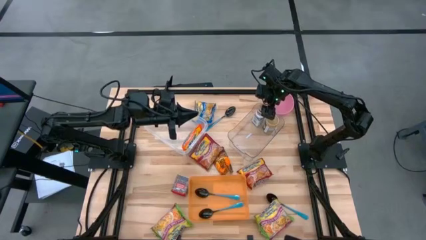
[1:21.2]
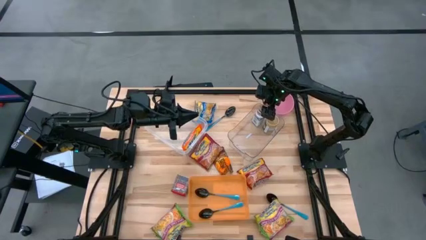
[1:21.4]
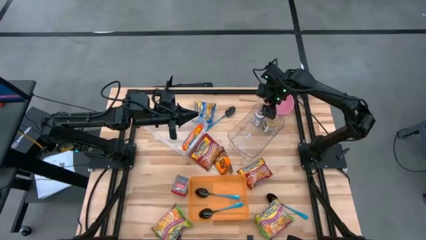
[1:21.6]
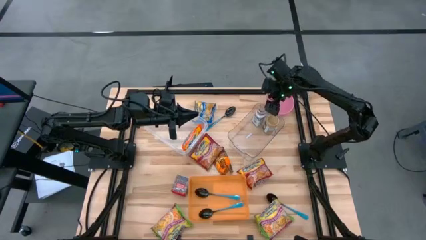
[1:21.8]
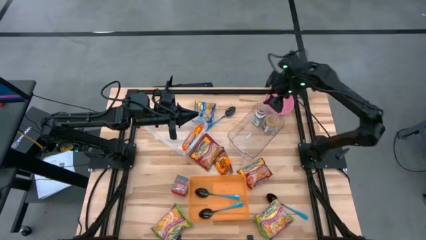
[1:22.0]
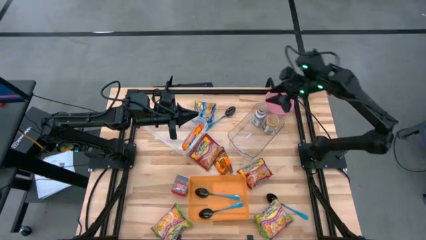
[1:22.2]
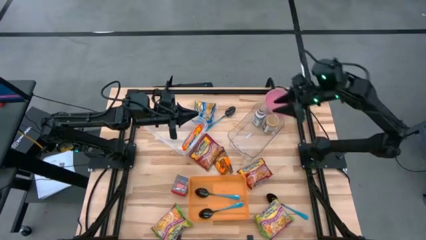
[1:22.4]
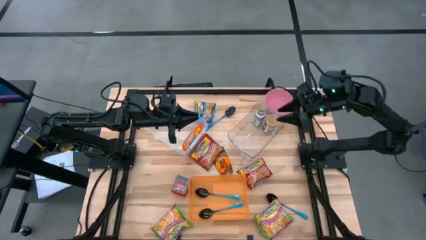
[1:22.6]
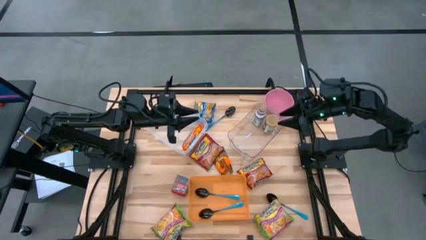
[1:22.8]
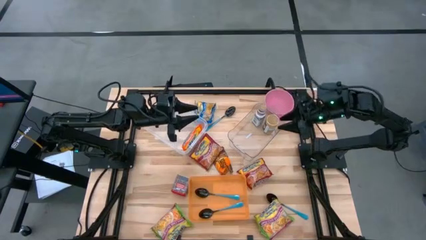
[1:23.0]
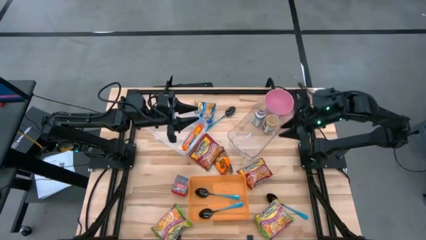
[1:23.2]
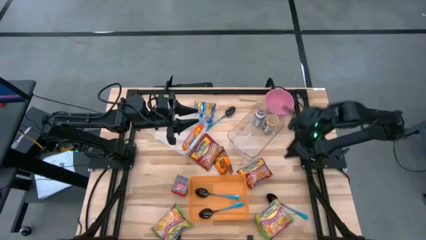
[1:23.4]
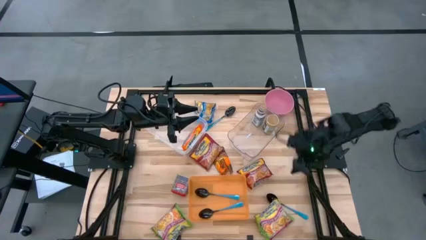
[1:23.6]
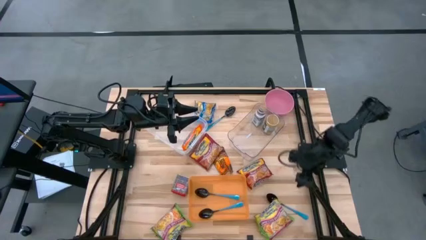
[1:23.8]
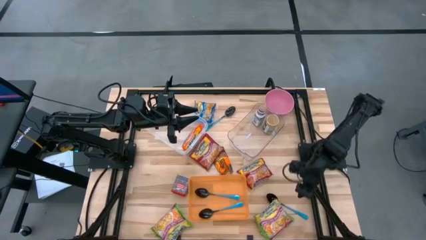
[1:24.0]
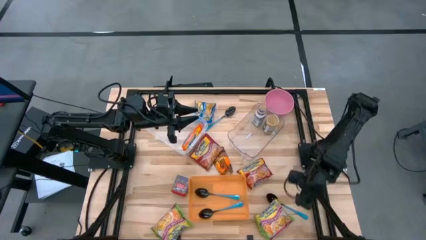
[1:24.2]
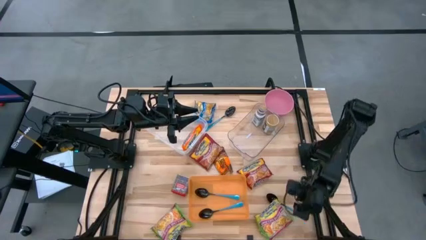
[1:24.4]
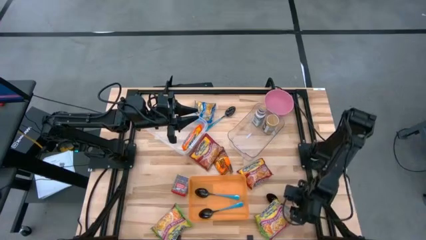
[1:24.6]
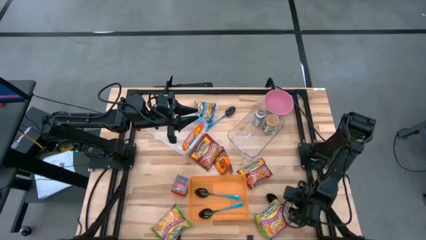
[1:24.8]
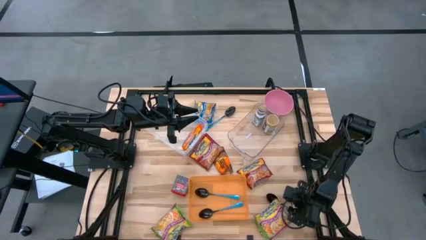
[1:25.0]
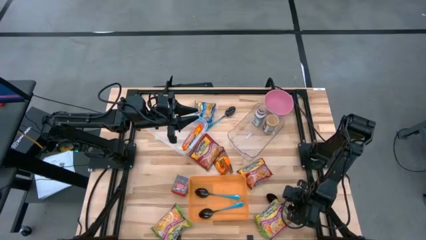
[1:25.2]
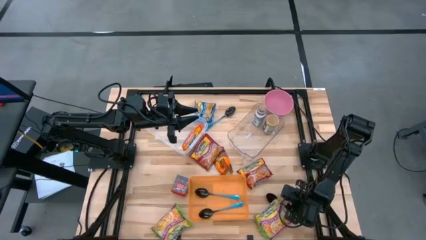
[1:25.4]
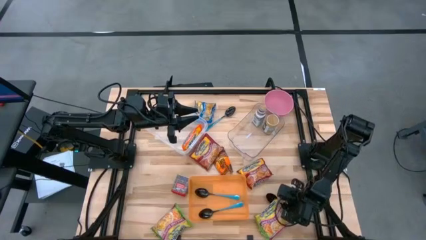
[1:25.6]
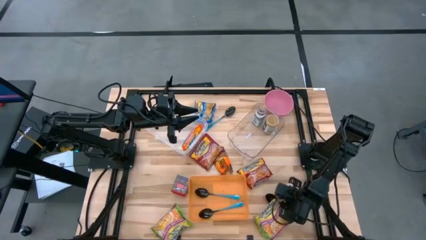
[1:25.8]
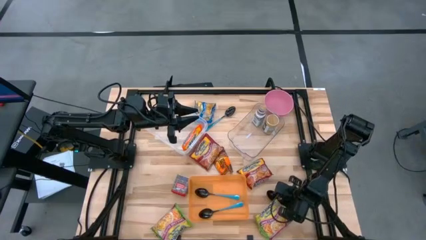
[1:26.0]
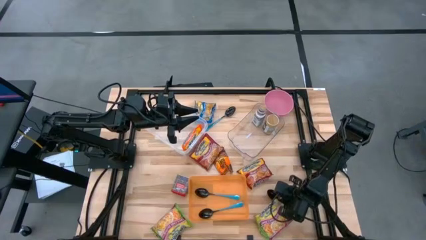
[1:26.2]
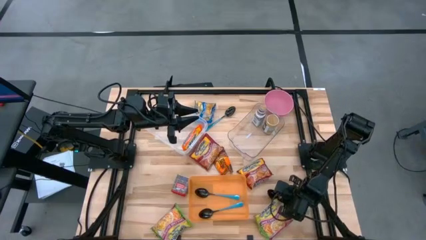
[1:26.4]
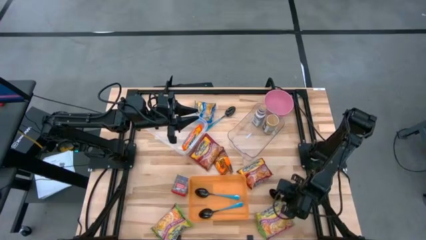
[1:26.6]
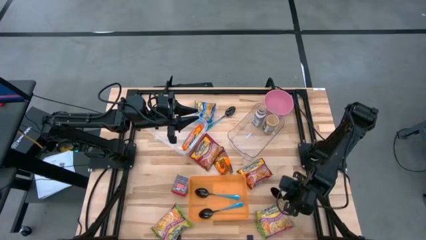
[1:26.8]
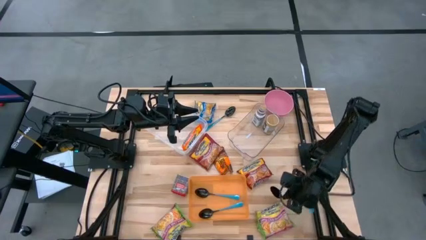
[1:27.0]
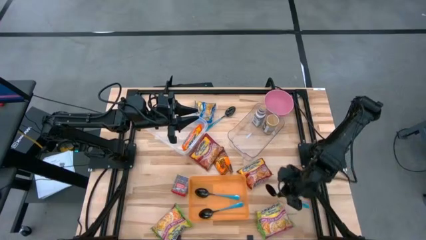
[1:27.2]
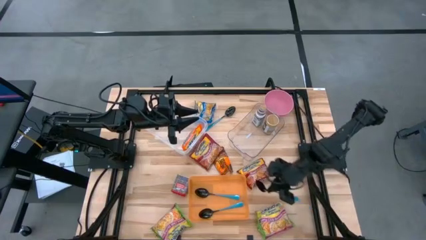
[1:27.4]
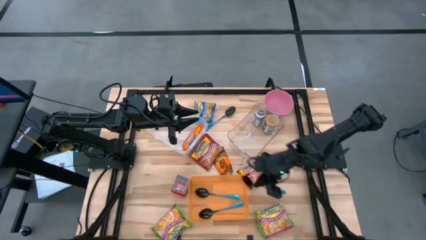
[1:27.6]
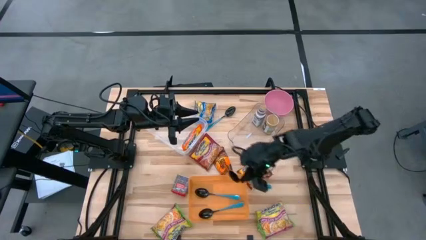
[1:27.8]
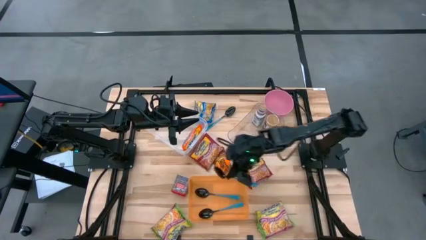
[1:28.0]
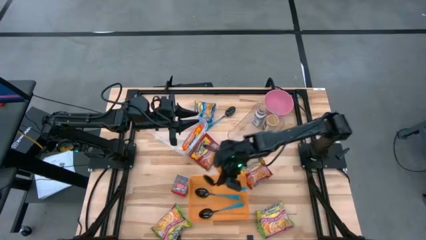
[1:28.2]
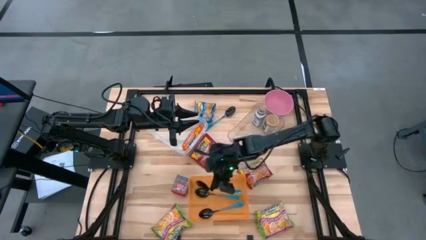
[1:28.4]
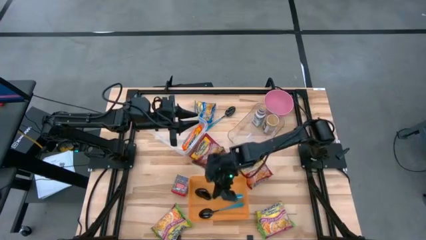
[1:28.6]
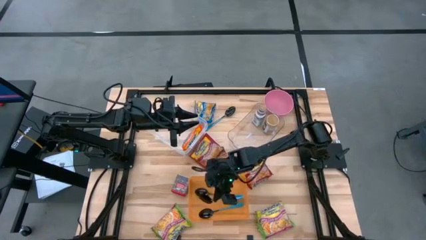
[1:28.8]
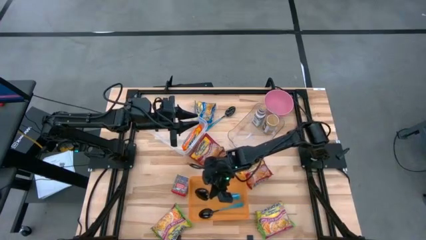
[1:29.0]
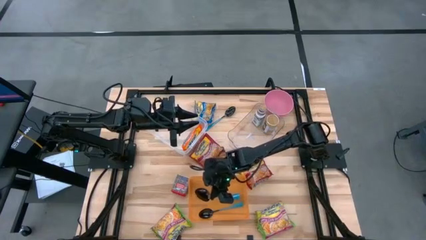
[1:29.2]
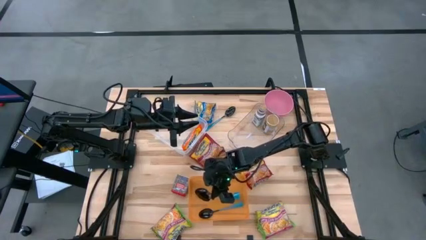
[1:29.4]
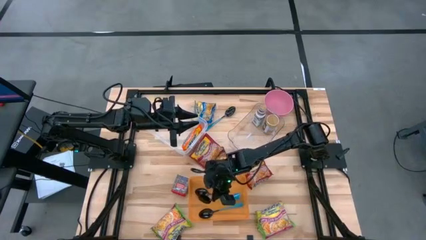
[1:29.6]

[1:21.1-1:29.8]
Task: Pick & Place Food Item
Put the black spoon into the orange bin

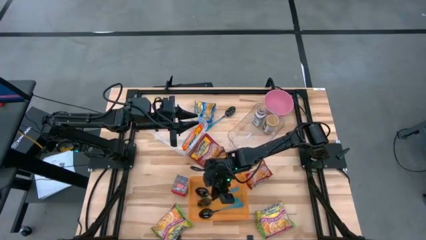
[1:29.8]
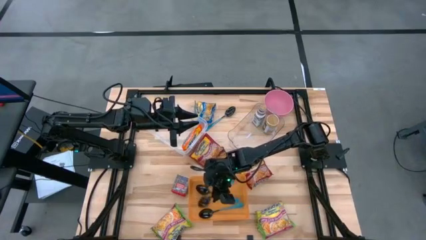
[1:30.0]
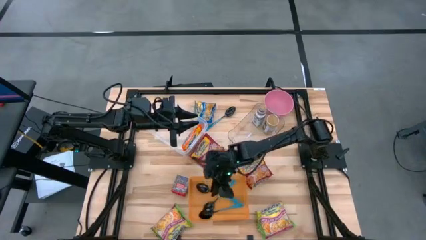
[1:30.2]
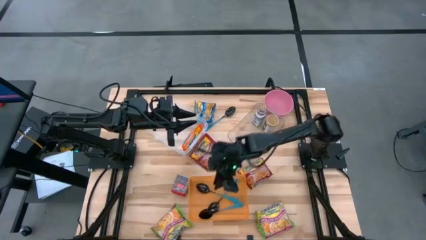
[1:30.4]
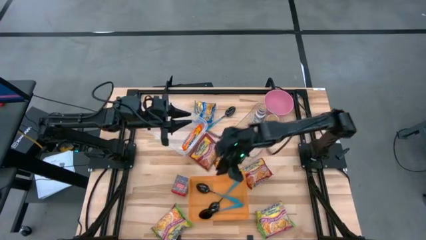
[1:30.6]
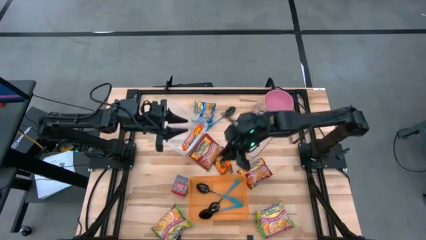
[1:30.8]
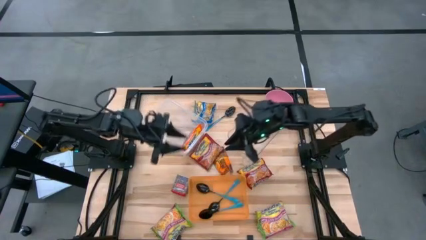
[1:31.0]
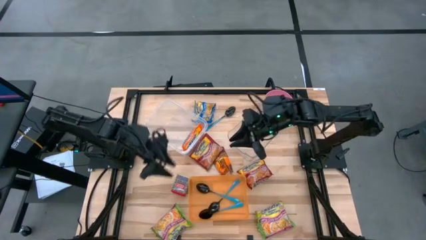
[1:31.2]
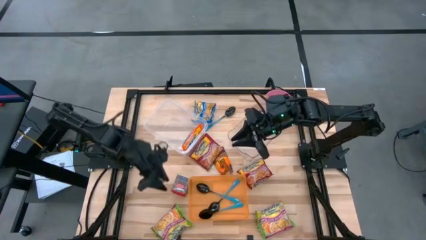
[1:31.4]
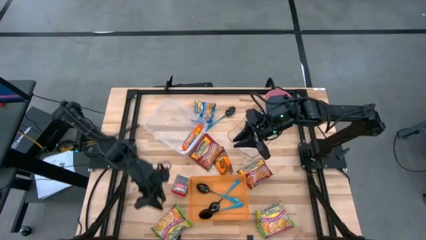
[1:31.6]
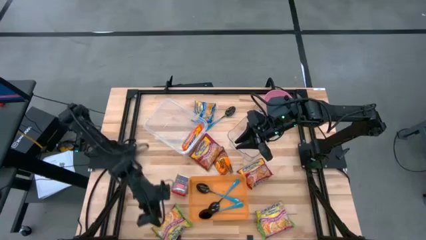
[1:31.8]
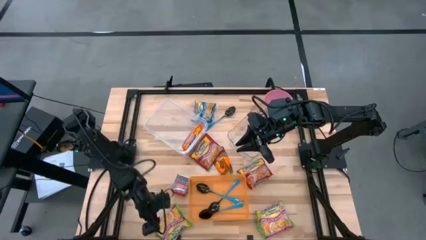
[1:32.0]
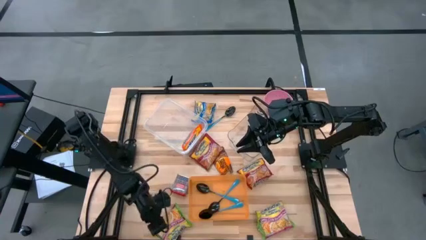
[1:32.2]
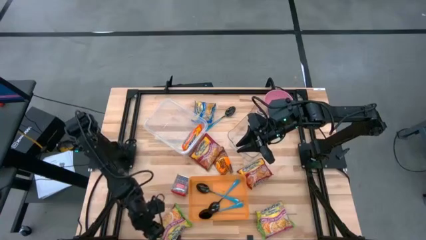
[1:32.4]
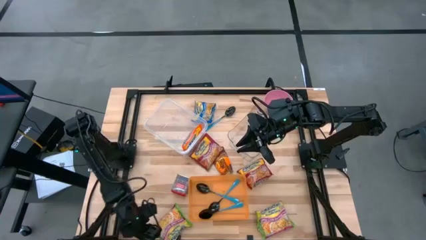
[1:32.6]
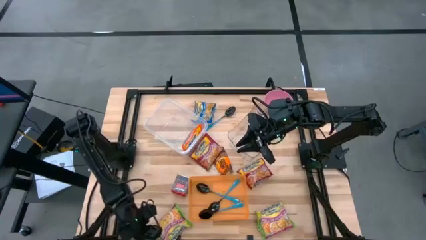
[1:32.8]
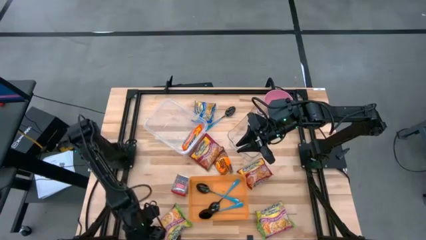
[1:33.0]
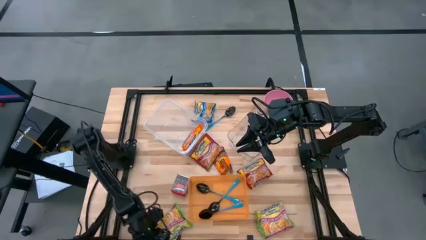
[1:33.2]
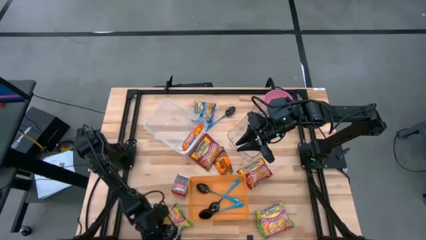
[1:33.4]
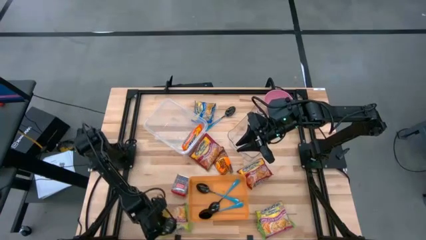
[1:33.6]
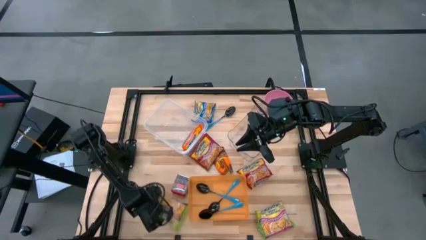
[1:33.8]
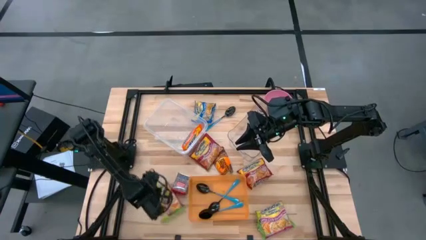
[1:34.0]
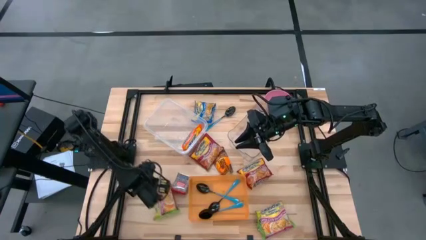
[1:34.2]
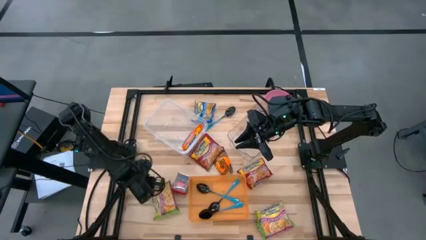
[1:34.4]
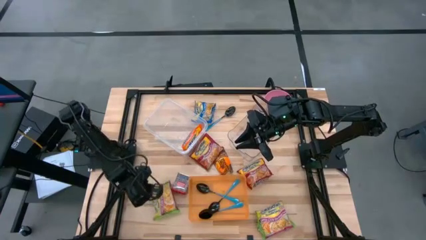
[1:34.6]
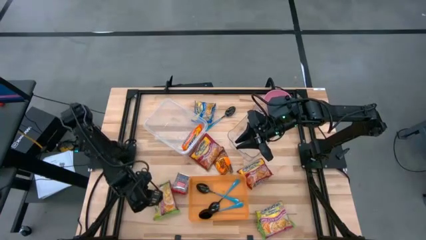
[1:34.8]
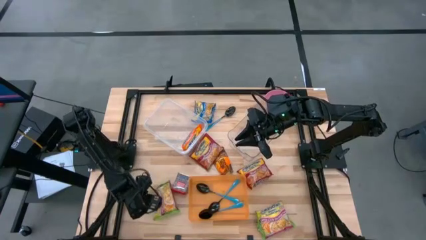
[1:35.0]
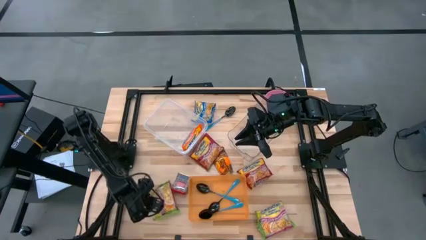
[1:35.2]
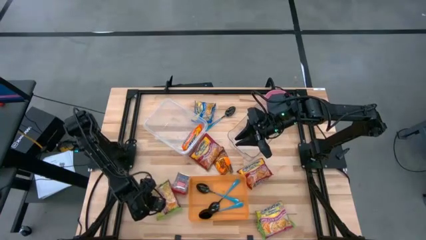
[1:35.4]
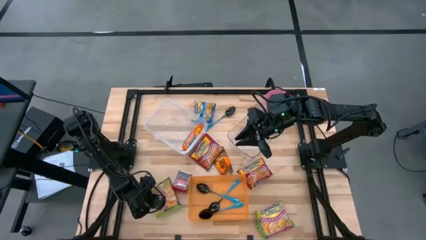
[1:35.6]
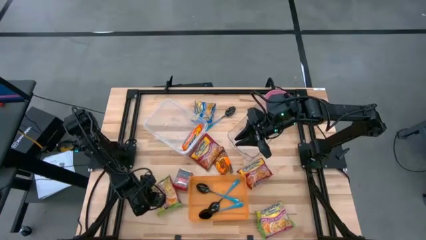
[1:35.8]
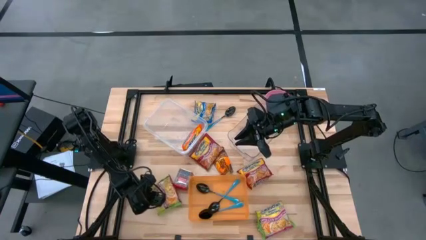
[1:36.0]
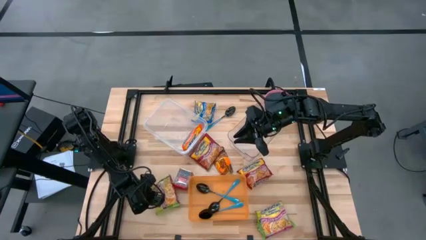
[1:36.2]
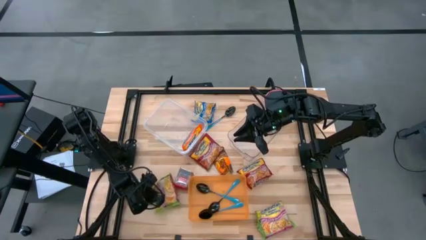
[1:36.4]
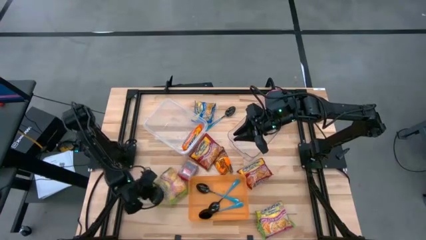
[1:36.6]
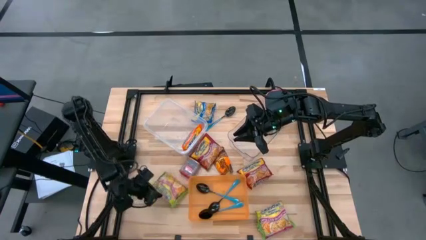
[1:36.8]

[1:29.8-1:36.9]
Put the green noodle pack into the transparent container

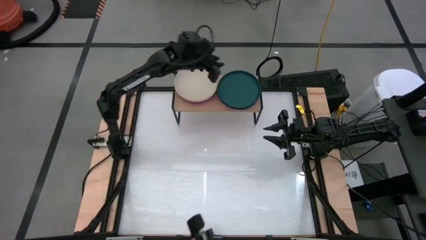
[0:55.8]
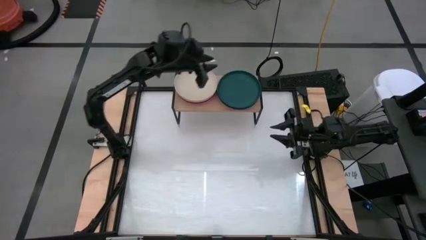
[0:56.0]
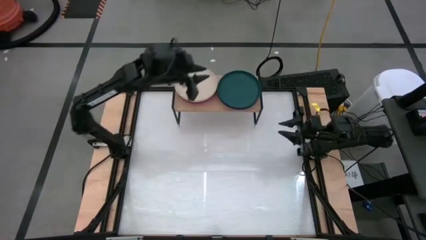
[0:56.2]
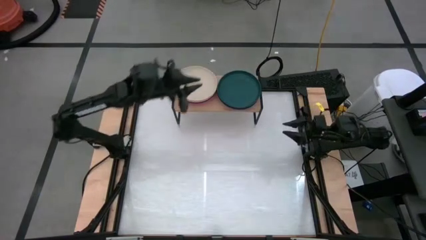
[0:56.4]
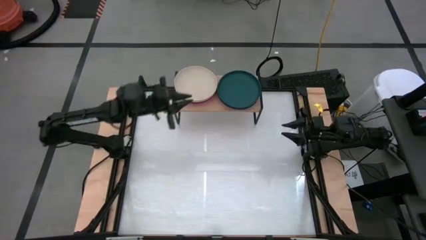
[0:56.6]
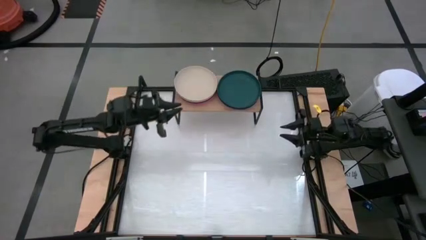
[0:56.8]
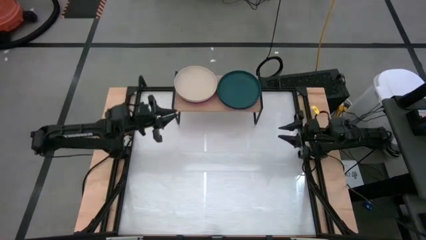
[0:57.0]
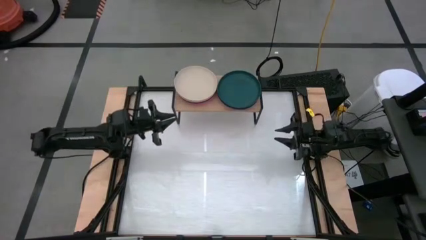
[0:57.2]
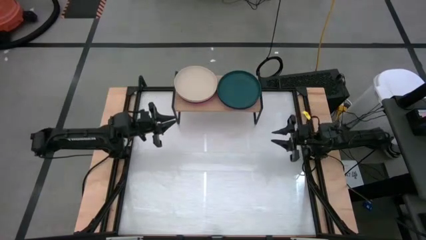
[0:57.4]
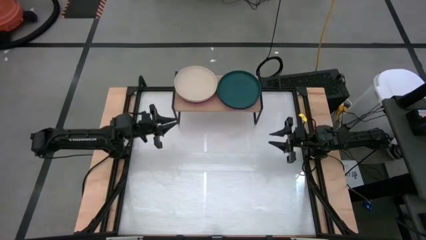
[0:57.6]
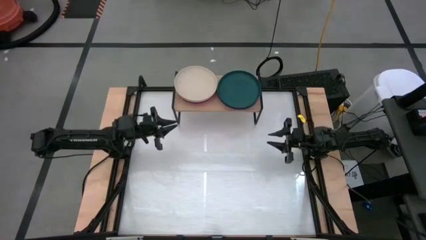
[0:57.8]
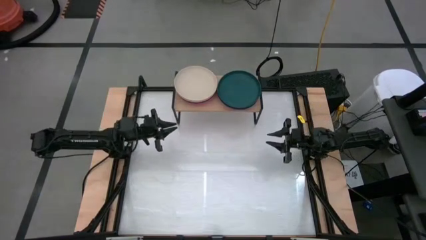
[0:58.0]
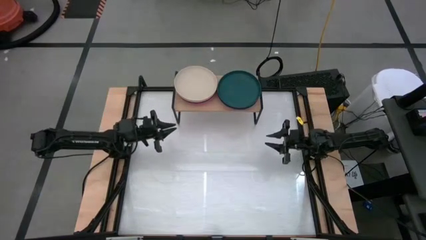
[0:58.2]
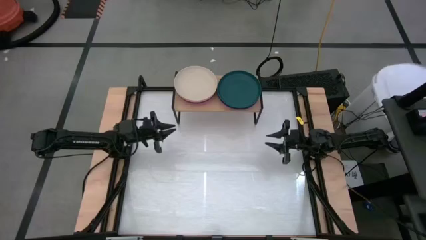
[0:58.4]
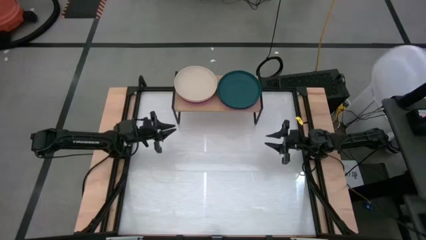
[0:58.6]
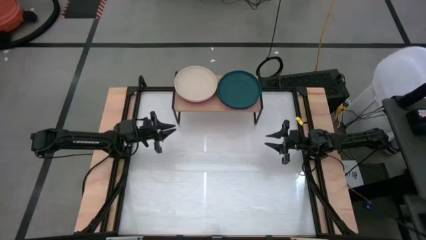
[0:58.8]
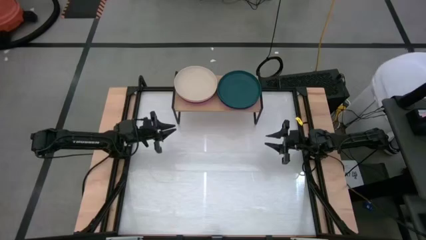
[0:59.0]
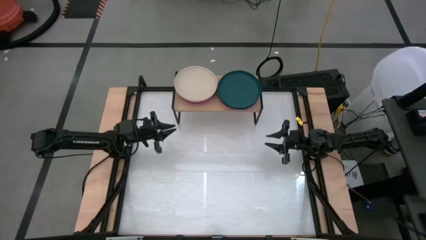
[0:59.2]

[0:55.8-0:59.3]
Task: Place and stack plates onto a shelf
Return to Home Position
